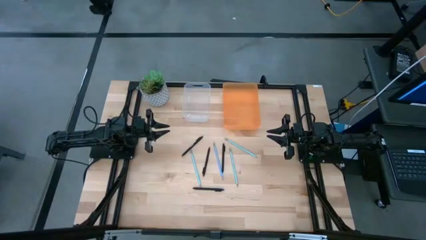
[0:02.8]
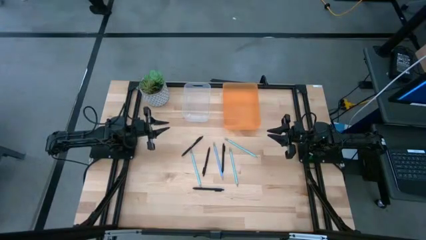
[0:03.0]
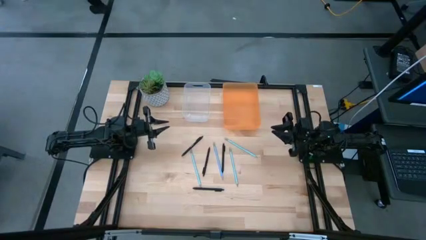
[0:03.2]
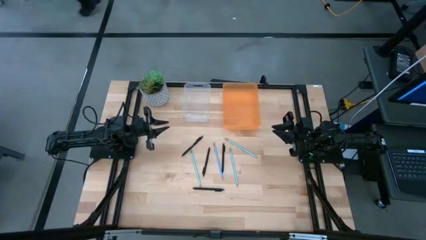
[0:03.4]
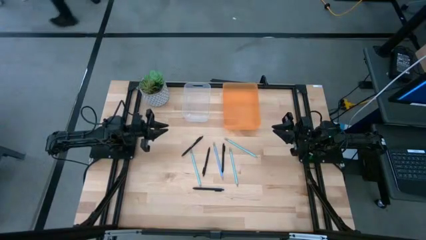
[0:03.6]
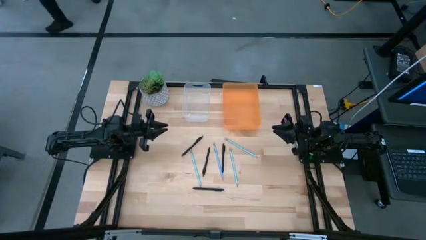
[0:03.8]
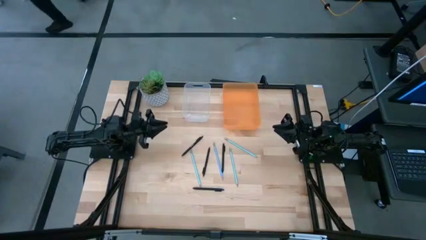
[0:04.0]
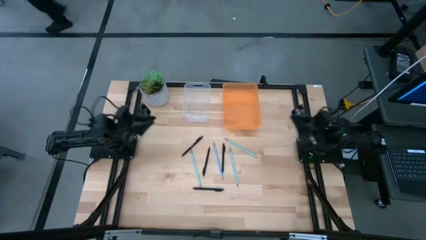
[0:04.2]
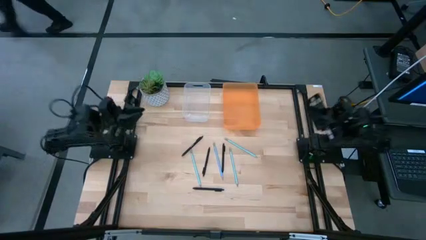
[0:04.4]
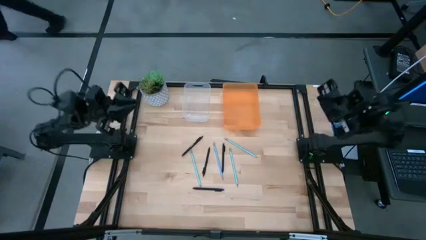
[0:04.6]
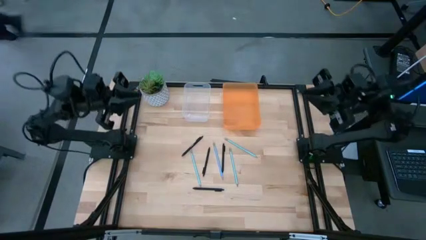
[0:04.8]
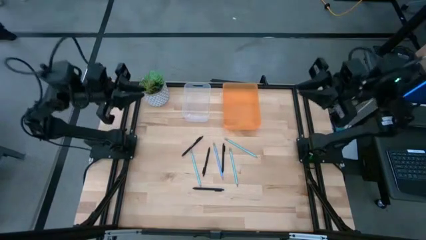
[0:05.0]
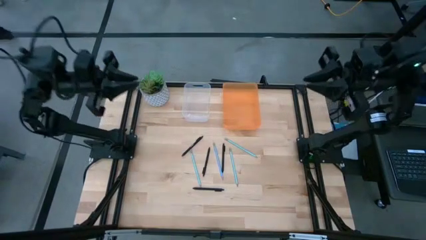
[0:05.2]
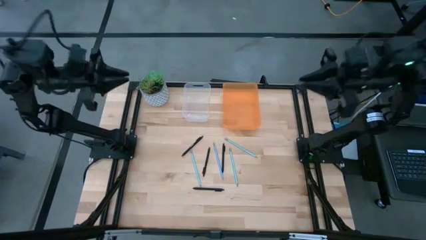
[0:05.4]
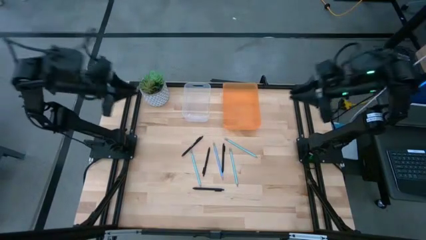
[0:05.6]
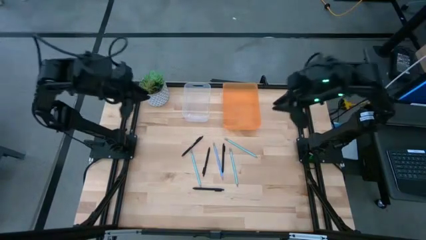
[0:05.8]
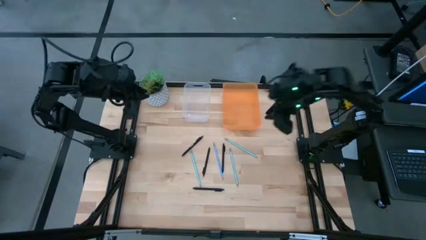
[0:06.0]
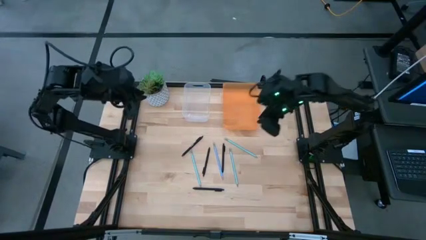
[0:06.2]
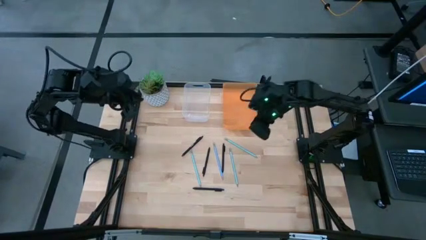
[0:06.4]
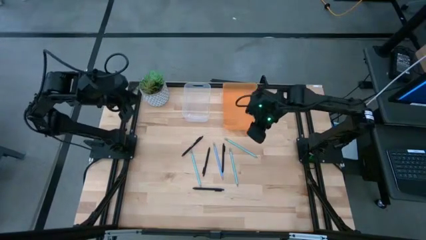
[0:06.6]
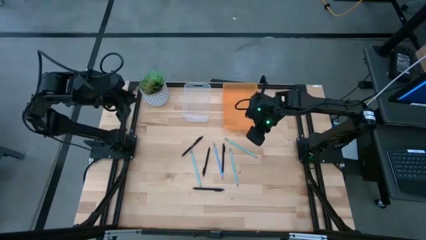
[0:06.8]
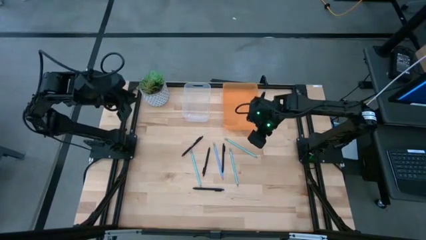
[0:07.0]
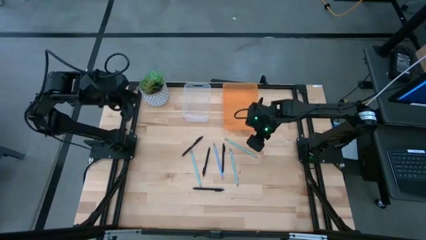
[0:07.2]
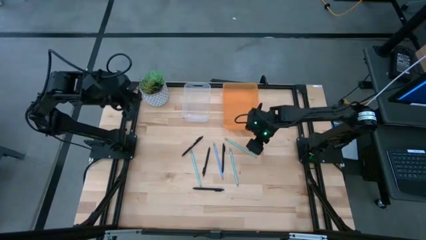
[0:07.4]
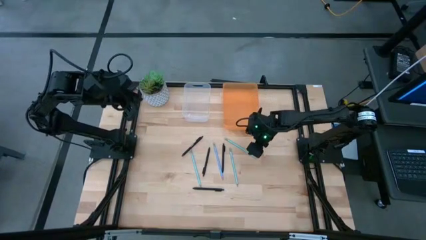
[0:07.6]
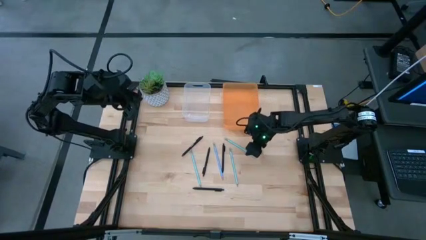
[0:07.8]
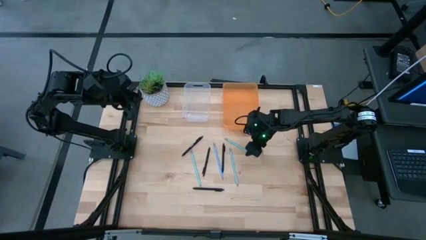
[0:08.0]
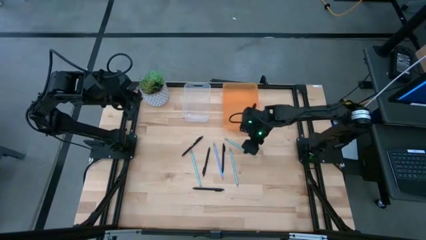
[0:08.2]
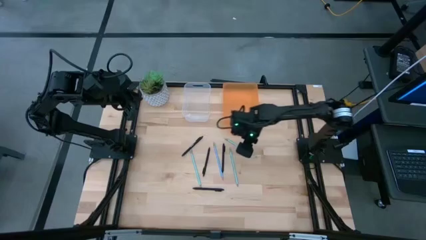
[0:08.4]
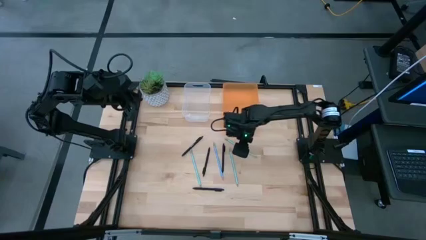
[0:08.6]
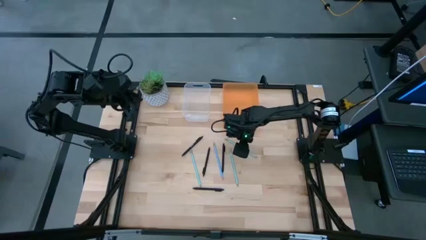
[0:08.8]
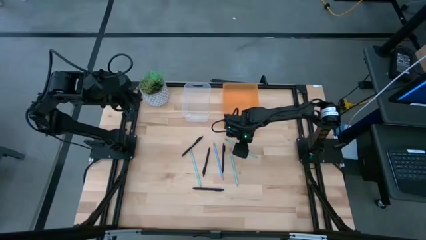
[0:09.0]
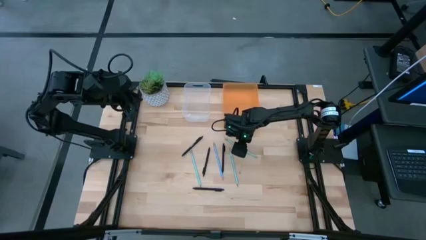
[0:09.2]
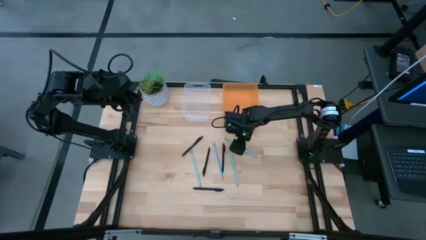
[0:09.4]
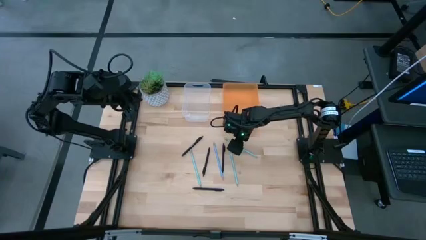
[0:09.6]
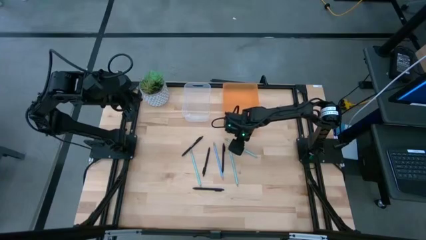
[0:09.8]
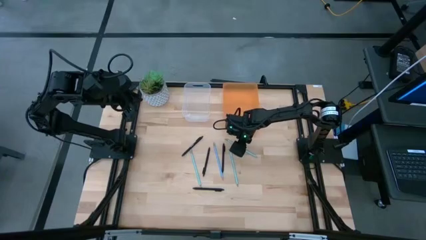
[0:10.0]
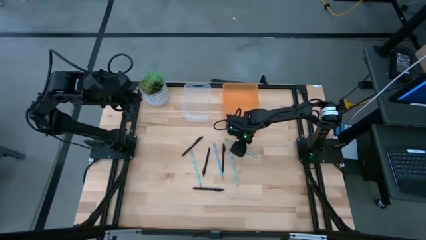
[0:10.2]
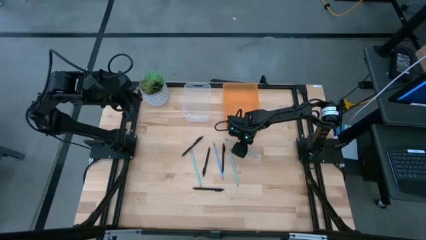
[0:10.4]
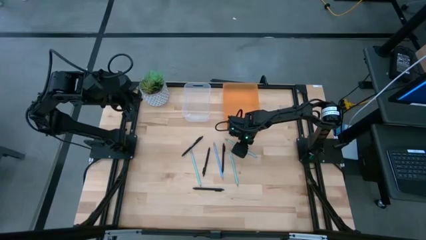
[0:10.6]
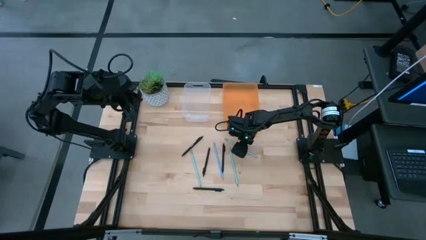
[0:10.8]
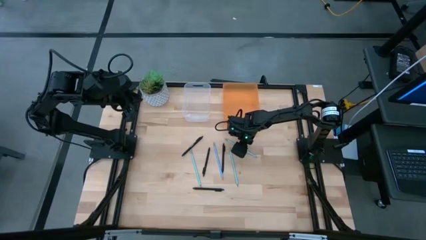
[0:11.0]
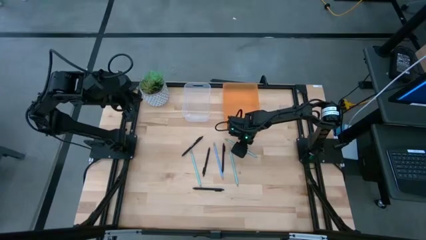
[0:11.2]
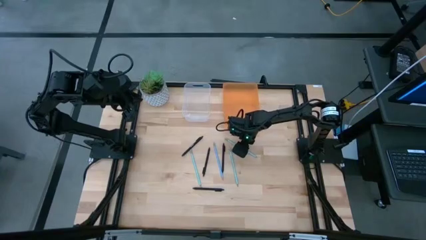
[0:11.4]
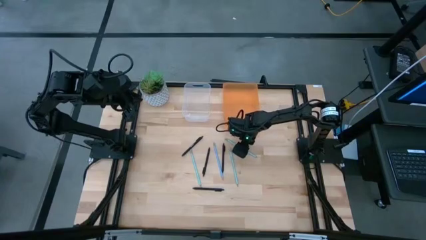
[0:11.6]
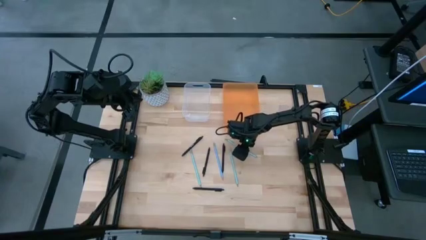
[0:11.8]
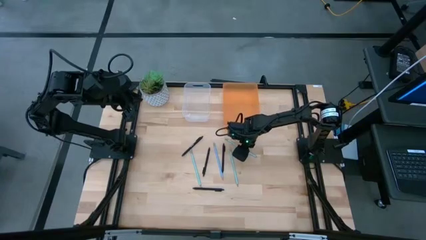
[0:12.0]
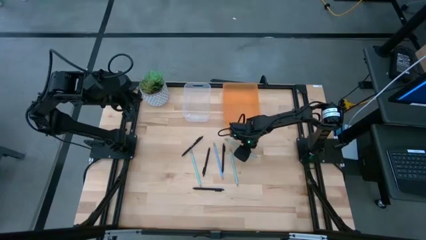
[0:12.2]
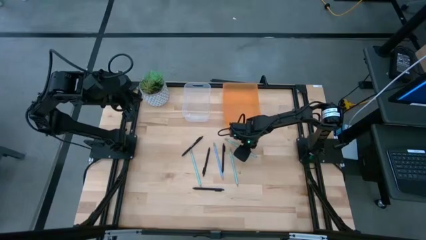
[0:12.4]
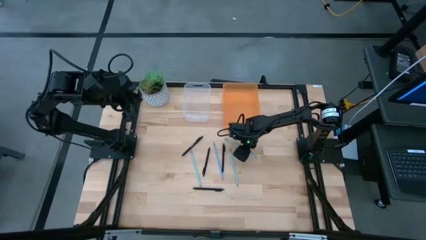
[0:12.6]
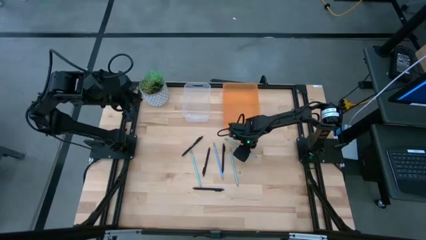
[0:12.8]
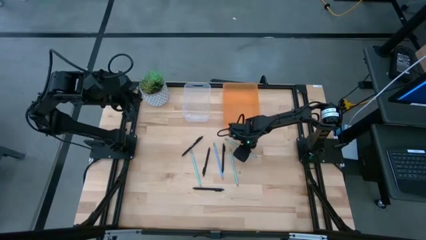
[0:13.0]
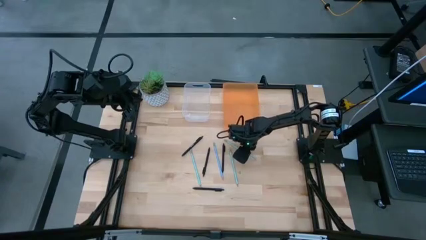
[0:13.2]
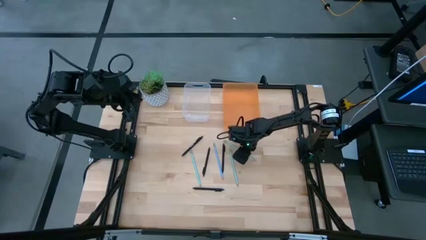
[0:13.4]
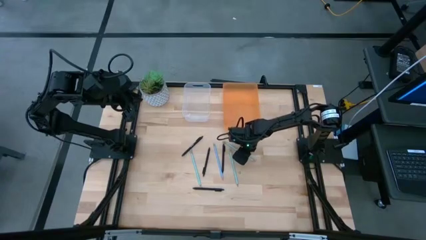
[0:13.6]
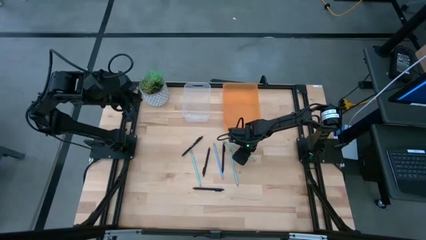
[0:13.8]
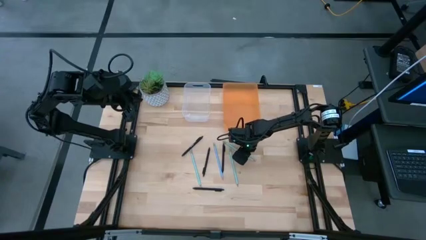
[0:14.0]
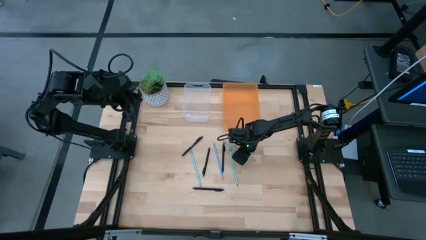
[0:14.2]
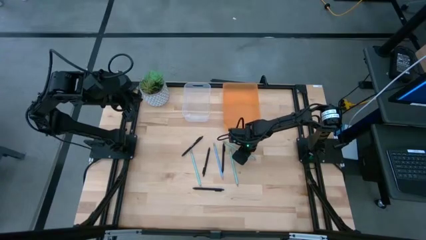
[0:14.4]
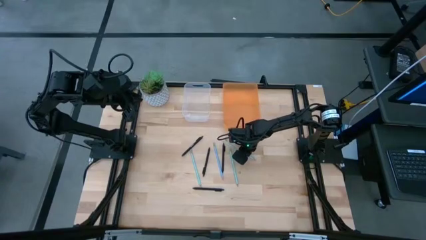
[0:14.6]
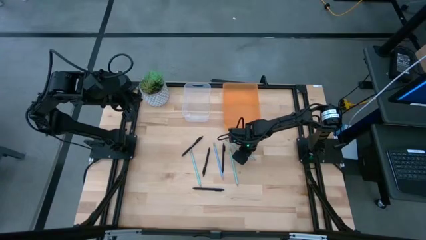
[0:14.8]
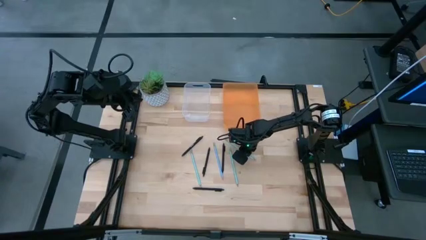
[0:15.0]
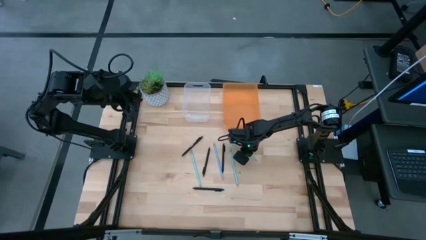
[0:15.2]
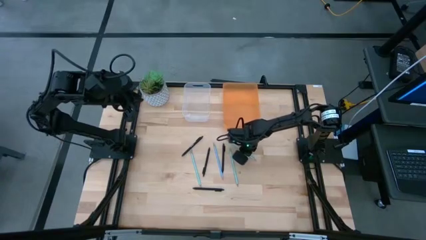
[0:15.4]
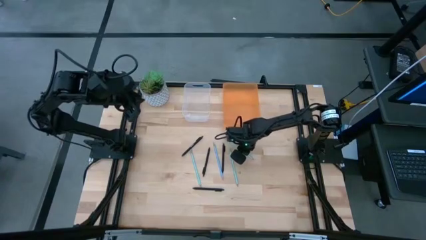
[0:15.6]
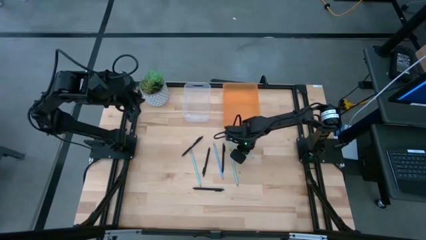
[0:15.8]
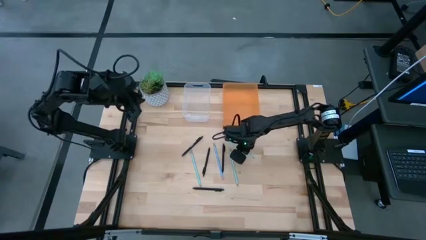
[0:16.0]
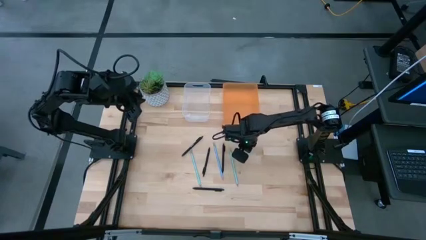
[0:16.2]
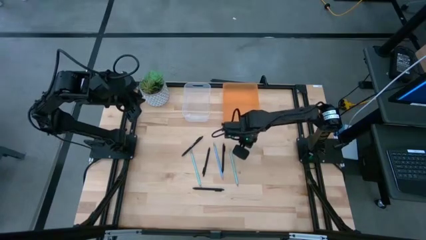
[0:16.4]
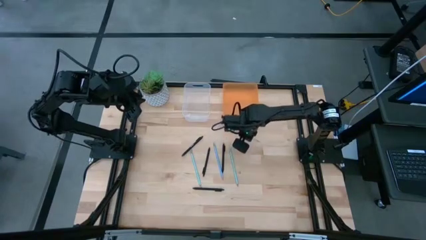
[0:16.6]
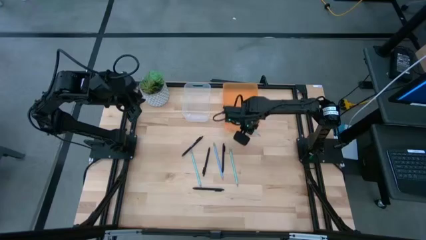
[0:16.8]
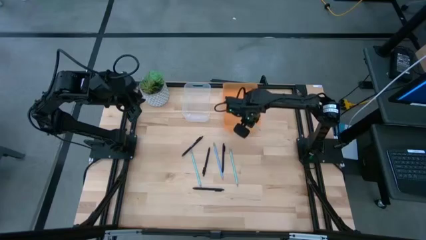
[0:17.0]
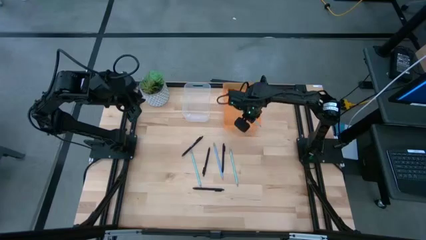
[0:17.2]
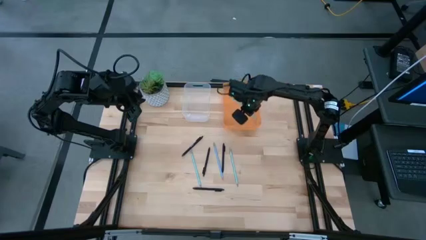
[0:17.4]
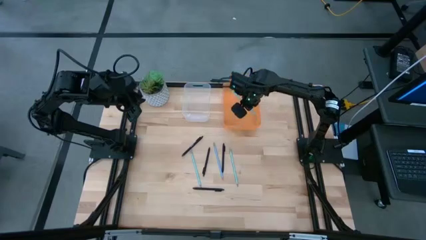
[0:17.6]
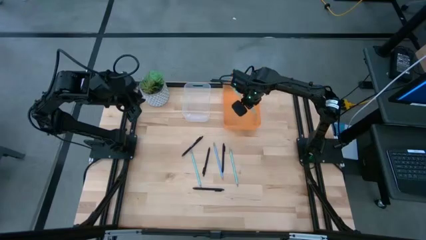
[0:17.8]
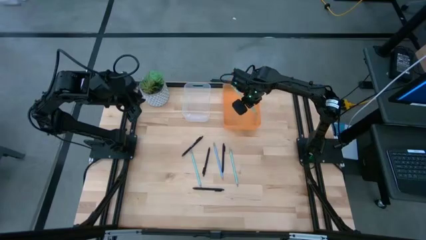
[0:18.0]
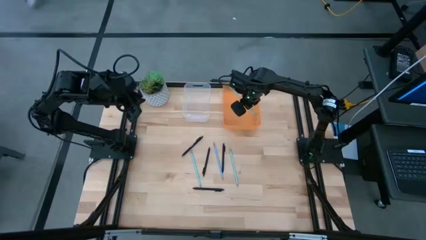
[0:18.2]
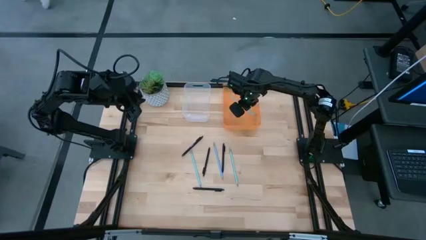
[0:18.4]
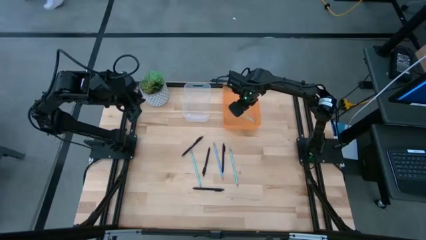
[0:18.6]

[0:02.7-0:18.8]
Task: Sort pens & pencils
Put the light green pencil into the orange bin
